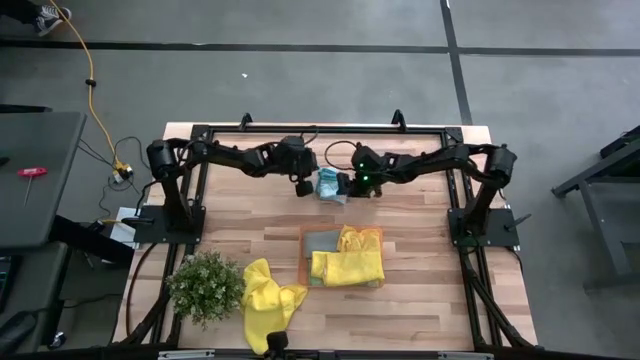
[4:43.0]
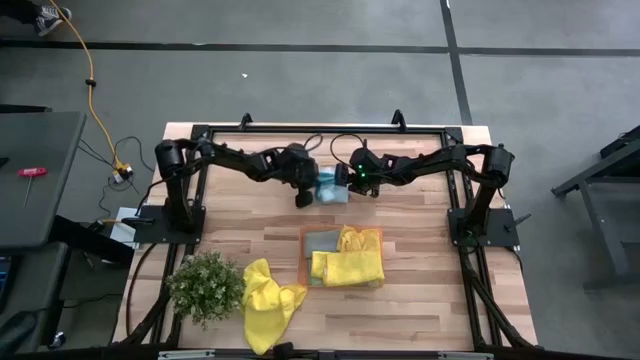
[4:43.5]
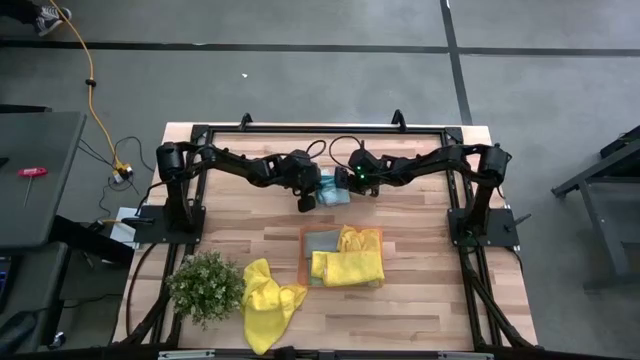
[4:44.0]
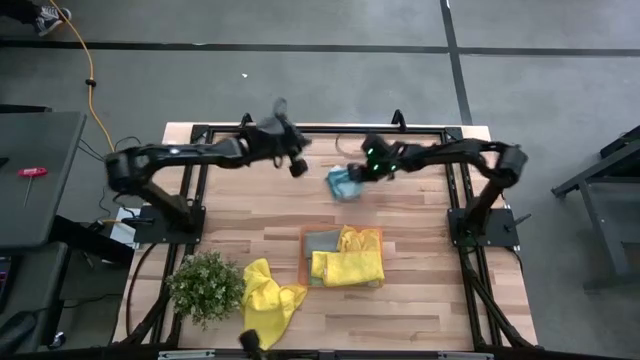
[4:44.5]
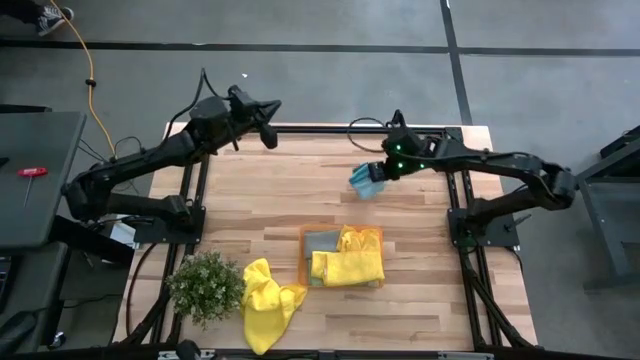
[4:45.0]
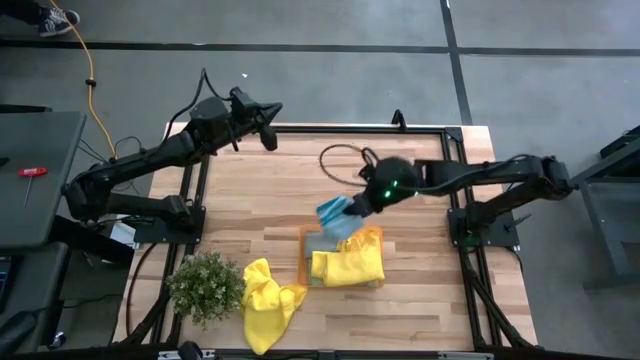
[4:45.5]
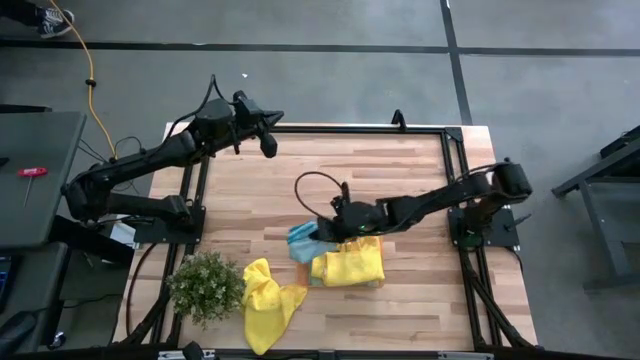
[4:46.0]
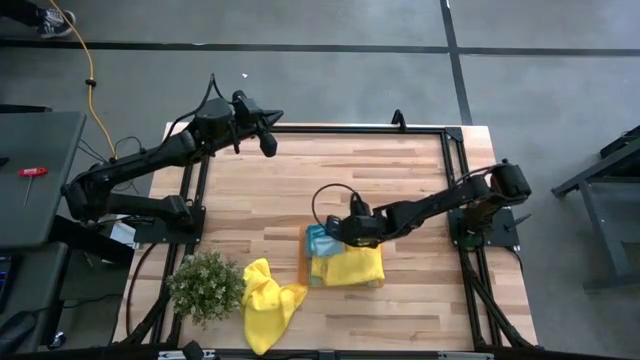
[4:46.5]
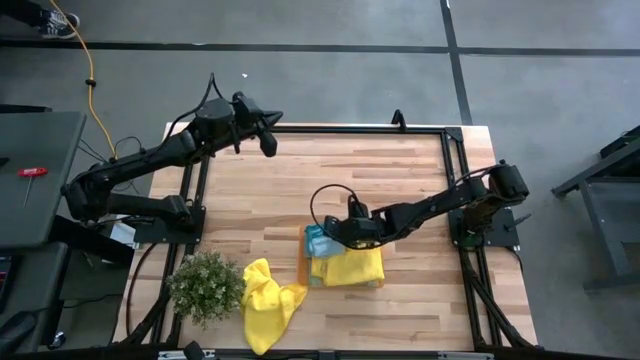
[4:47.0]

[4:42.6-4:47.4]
Task: Fold microfiber towels
Put the blue microfiber towel into the orange bin

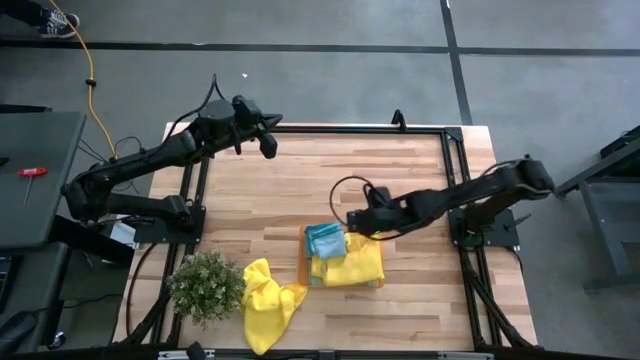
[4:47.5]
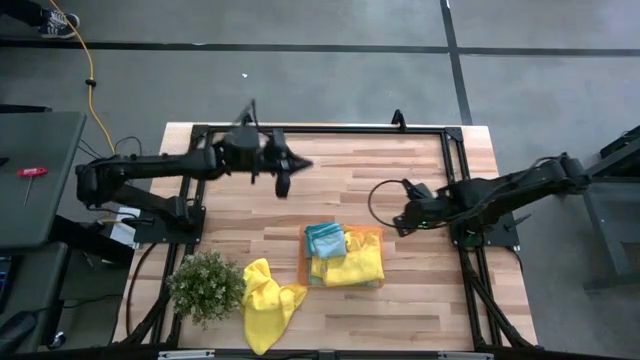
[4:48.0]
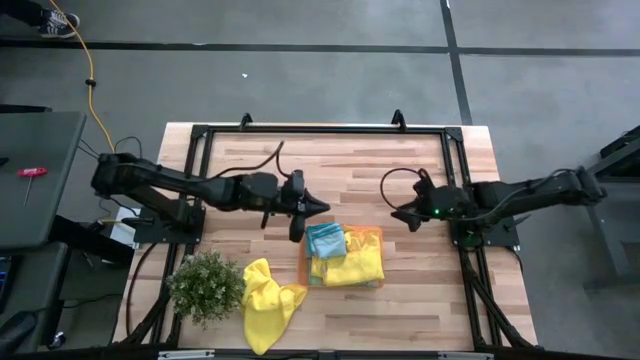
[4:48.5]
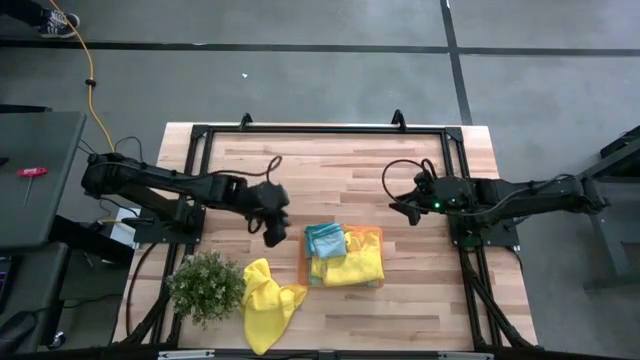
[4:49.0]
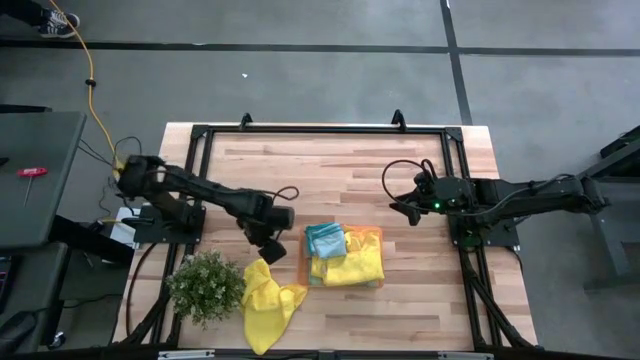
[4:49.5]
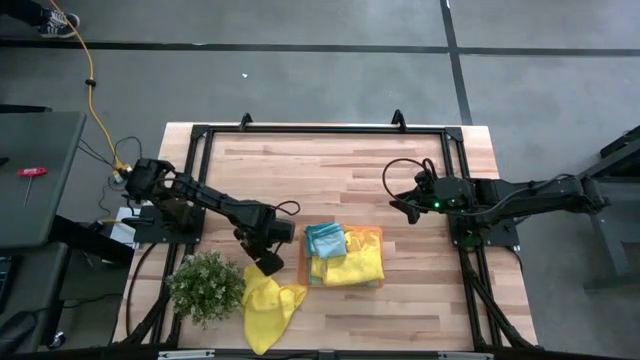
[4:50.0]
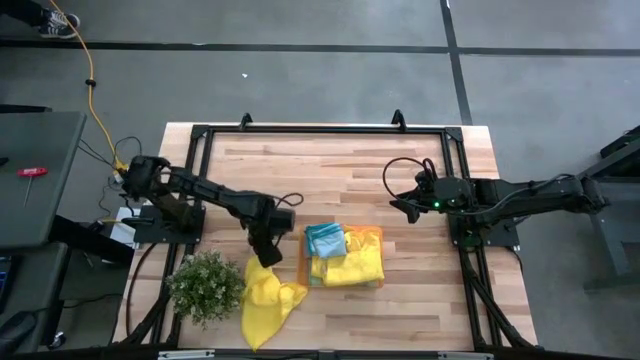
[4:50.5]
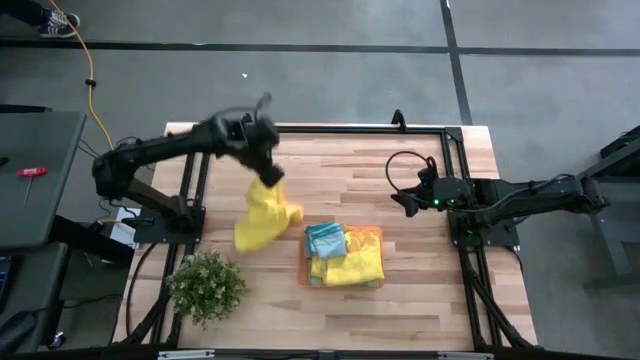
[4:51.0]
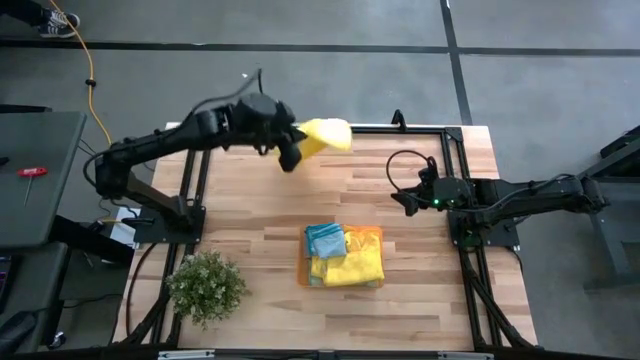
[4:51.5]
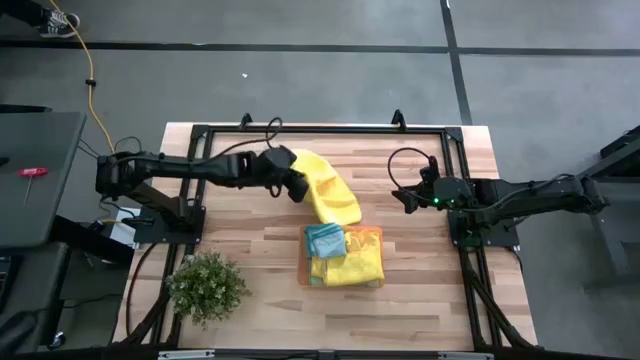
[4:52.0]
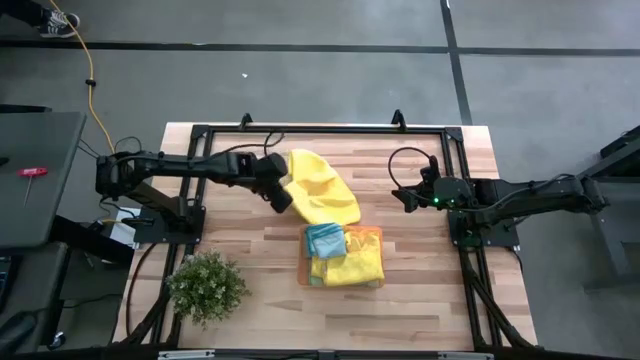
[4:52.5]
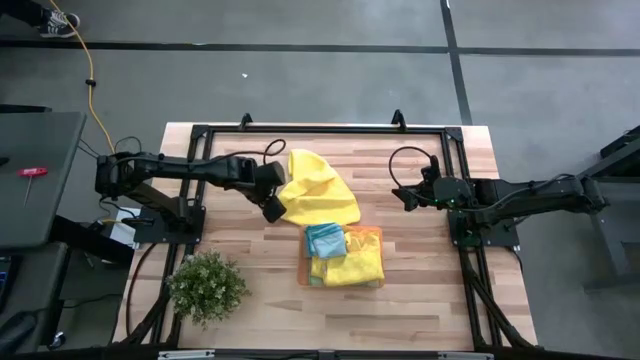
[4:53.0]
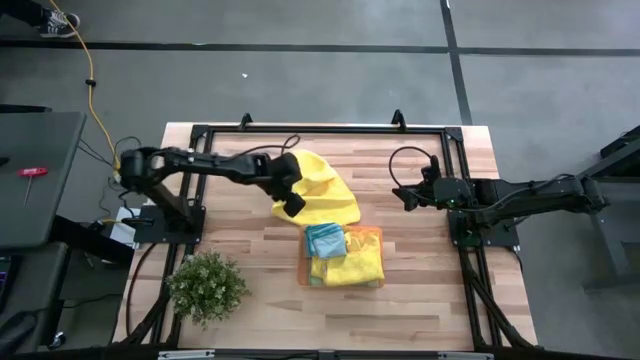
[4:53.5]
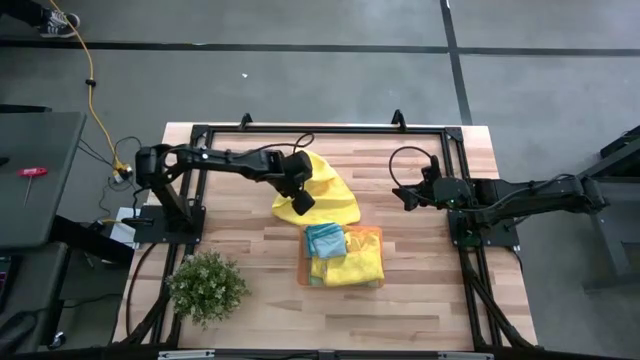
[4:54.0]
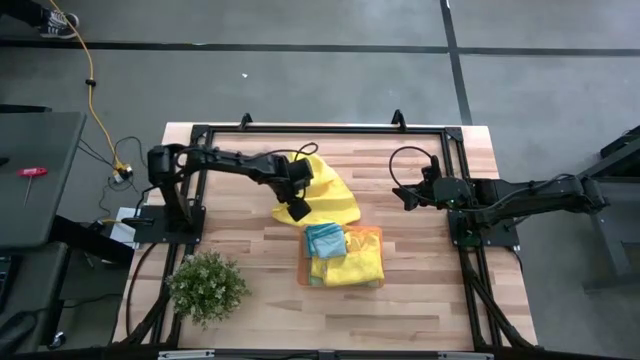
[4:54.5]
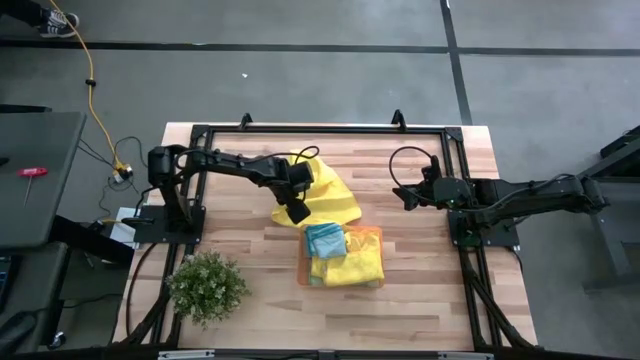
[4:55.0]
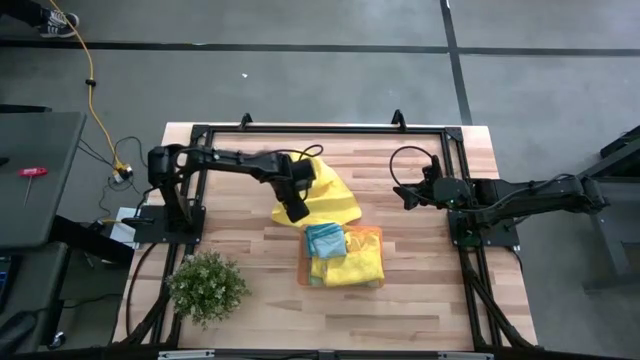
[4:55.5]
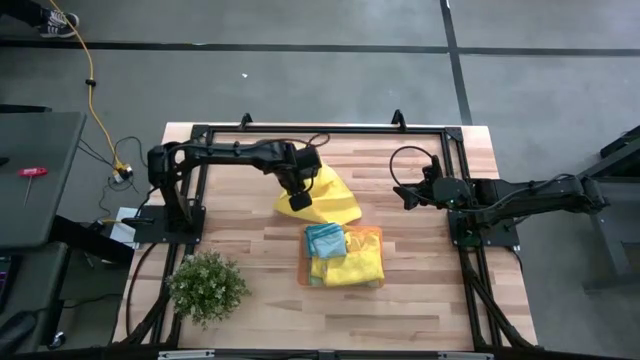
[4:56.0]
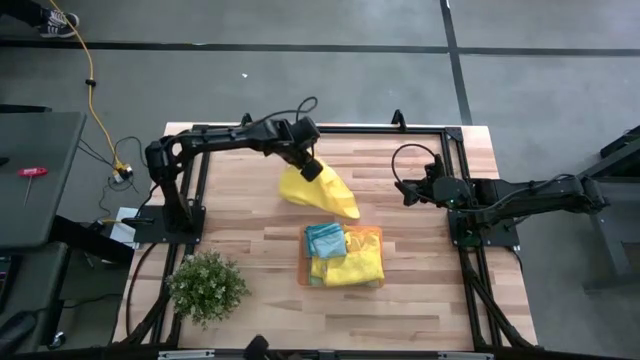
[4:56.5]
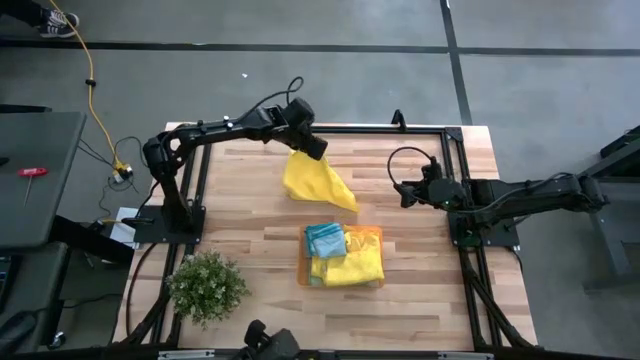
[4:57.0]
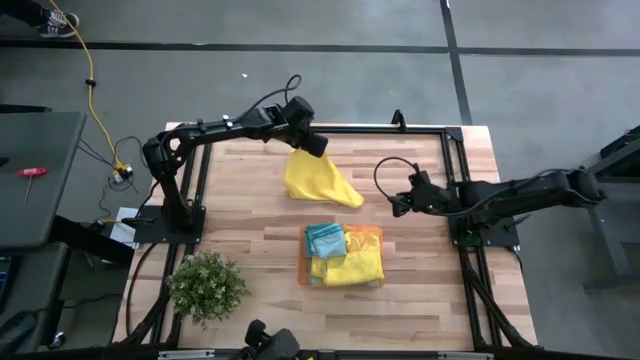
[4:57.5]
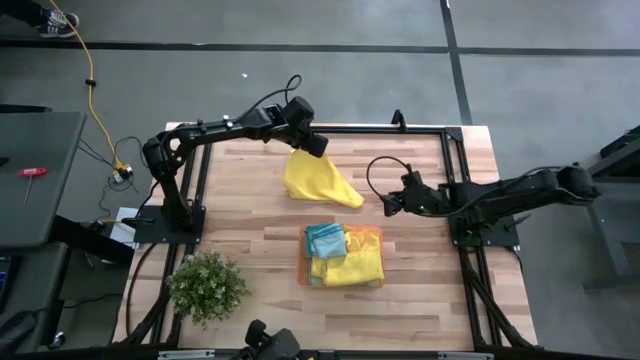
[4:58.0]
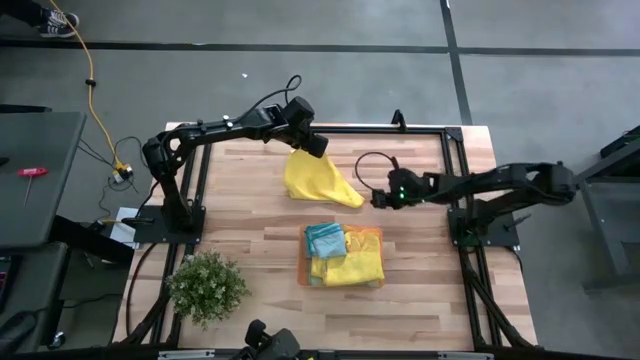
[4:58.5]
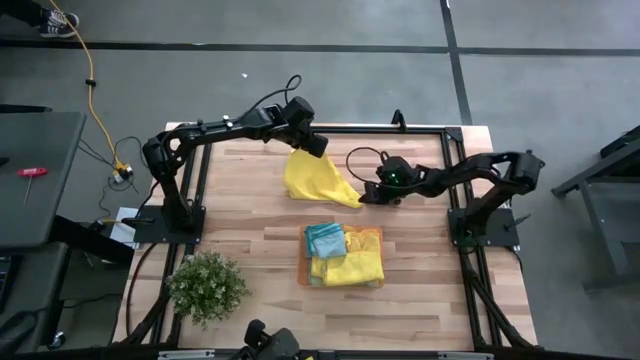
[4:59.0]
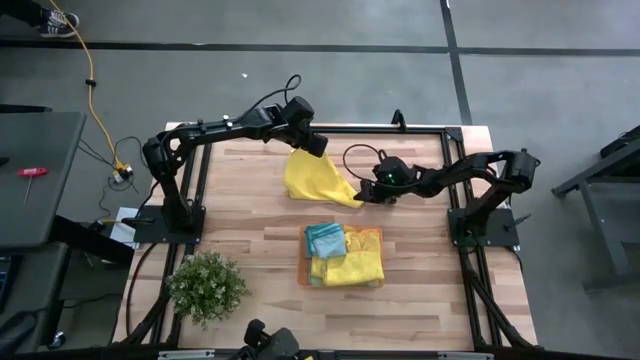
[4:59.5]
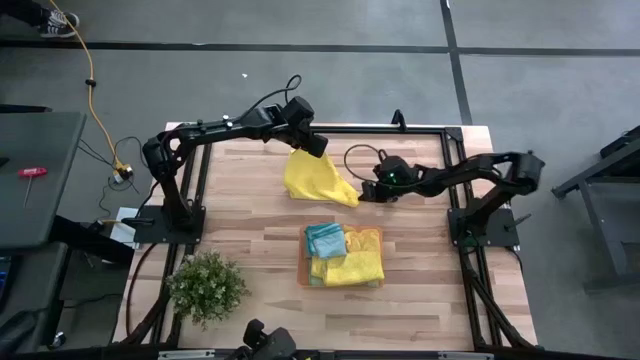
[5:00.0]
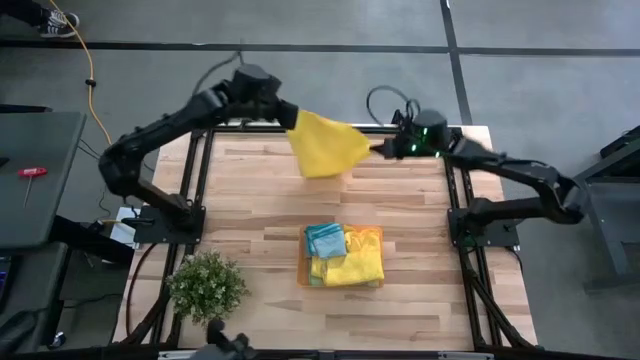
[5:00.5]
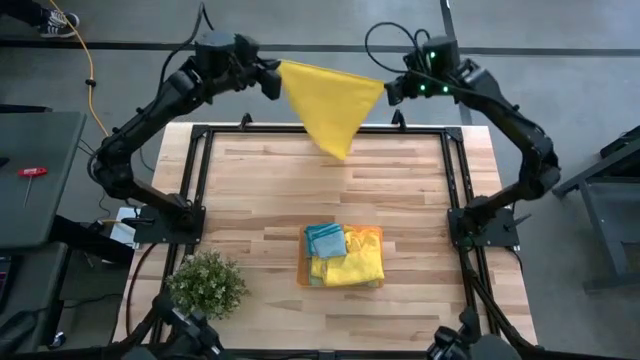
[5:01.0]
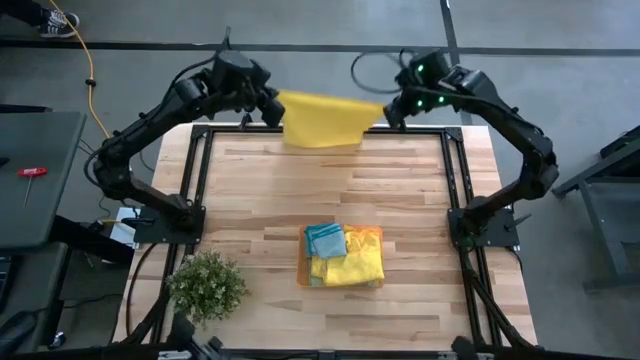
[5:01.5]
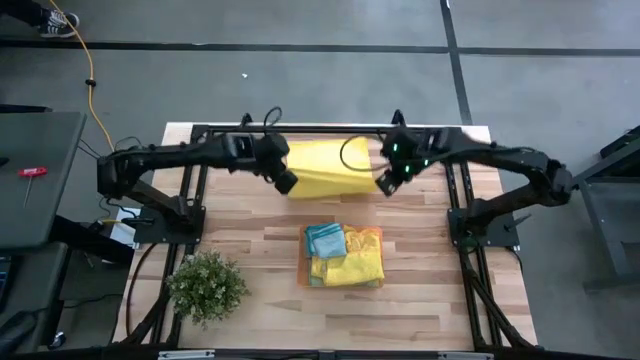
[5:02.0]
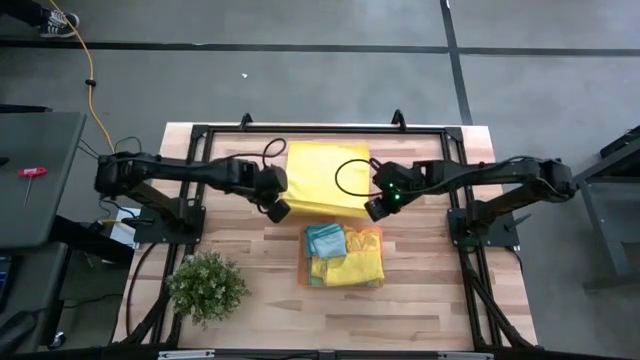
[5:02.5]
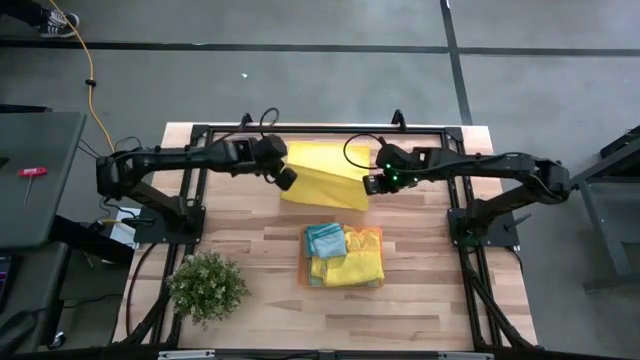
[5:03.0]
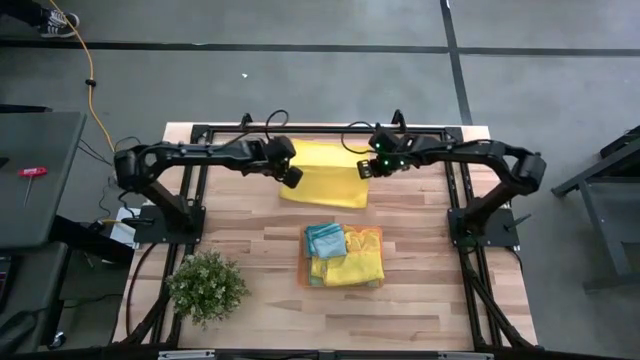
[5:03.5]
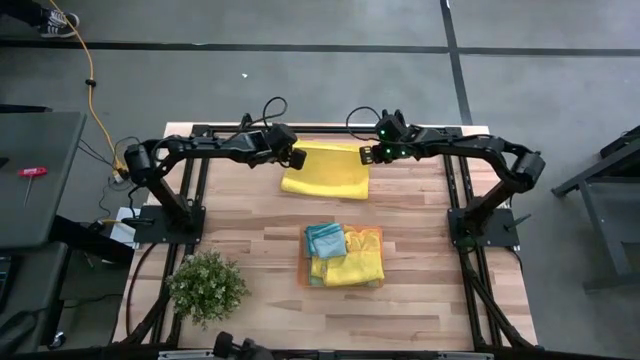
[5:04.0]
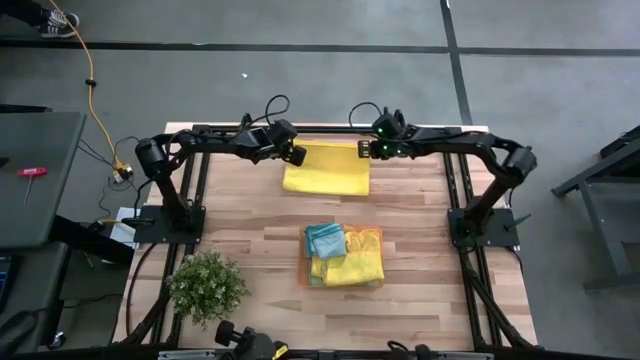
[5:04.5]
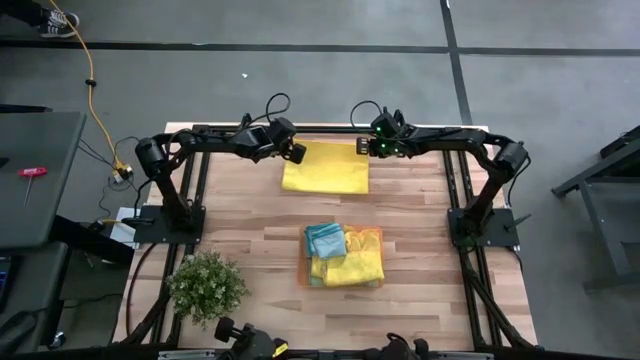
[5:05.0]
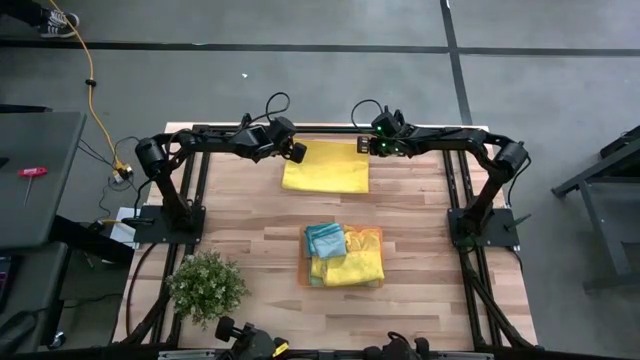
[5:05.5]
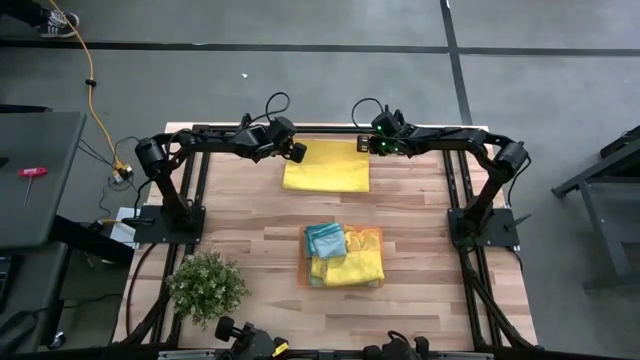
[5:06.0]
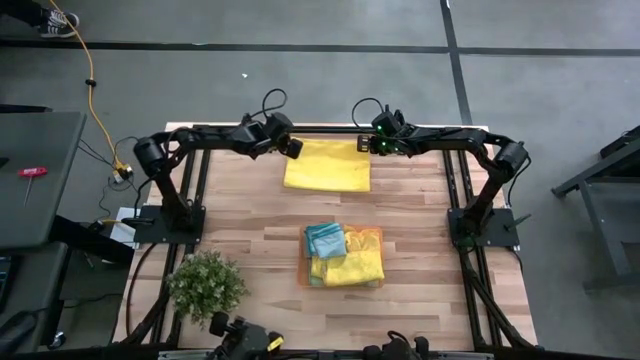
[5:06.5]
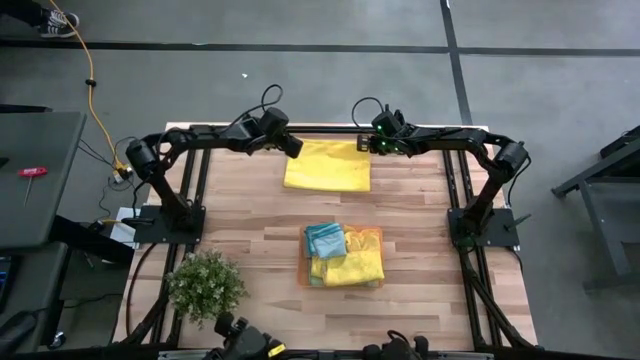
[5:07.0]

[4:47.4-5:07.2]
Fold the yellow microfiber towel
